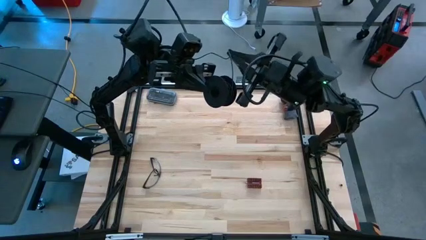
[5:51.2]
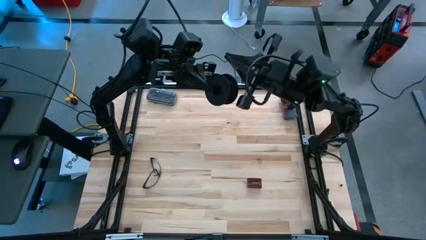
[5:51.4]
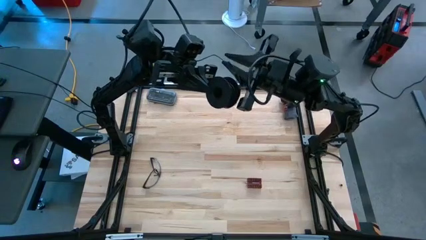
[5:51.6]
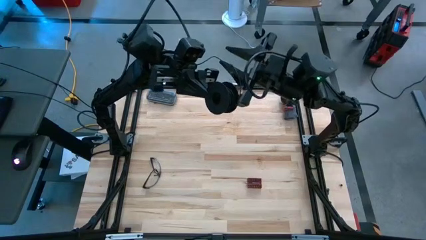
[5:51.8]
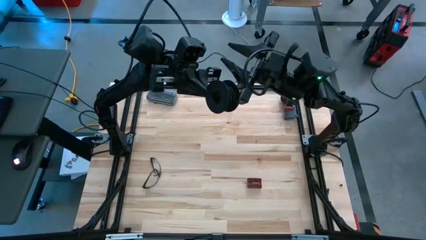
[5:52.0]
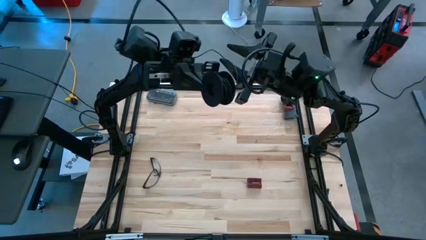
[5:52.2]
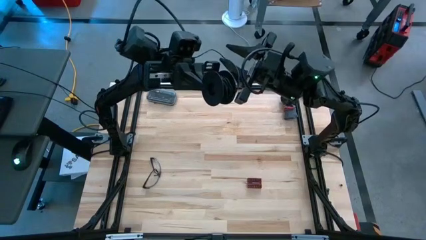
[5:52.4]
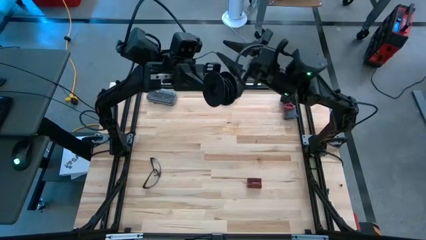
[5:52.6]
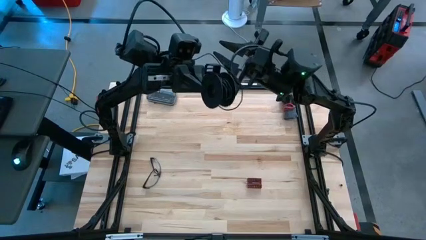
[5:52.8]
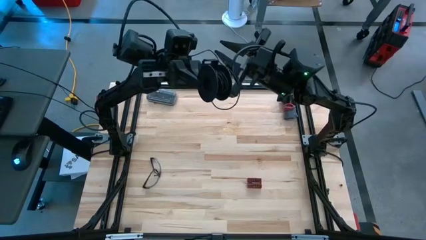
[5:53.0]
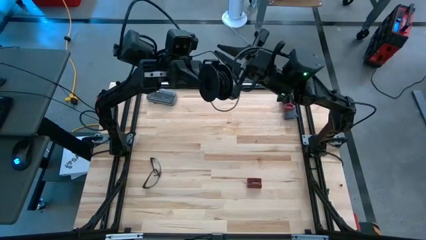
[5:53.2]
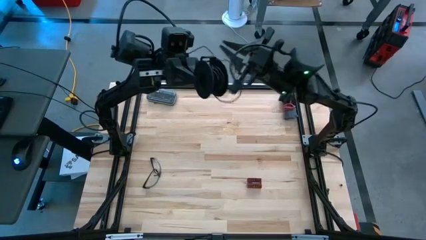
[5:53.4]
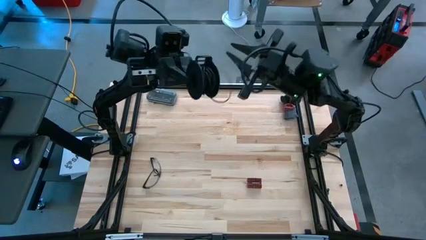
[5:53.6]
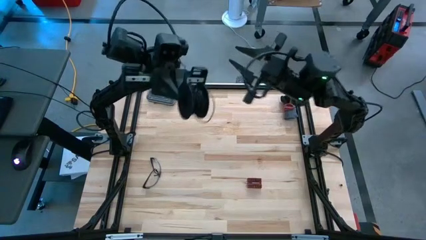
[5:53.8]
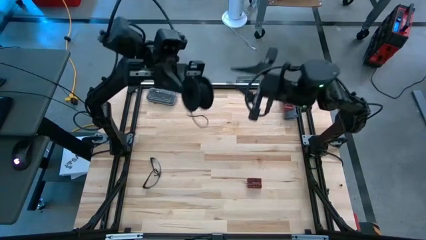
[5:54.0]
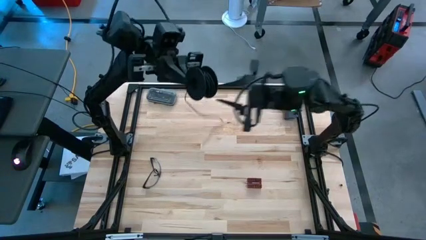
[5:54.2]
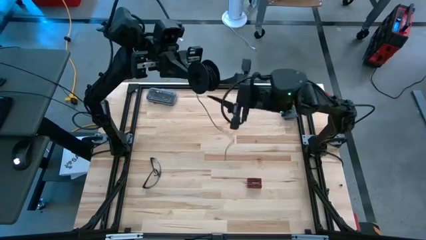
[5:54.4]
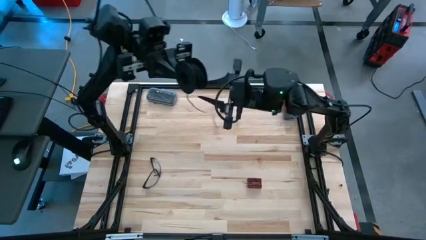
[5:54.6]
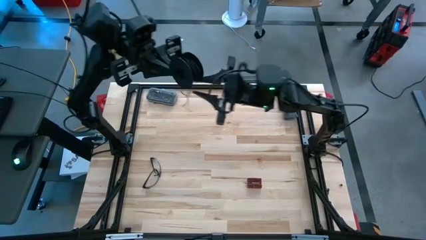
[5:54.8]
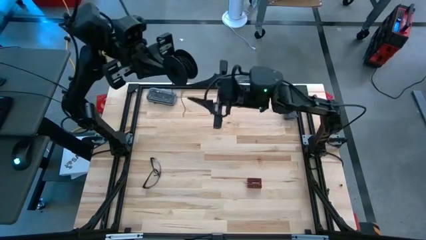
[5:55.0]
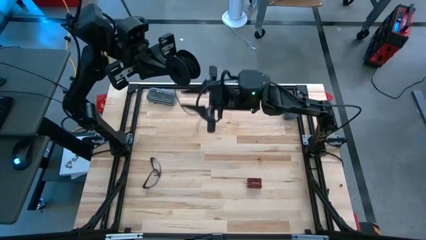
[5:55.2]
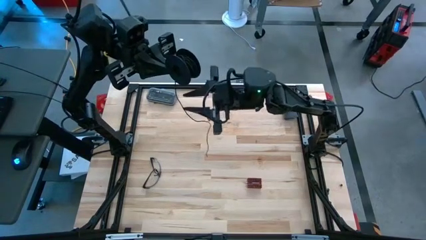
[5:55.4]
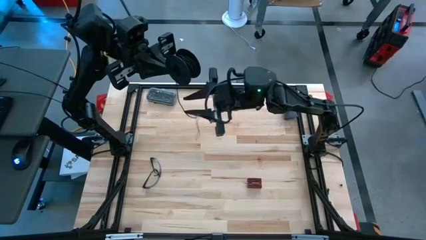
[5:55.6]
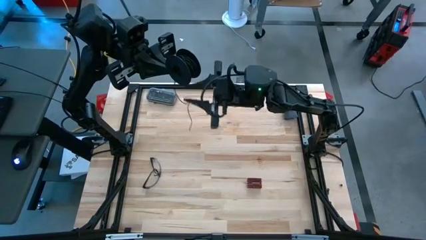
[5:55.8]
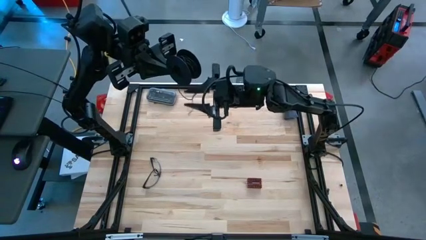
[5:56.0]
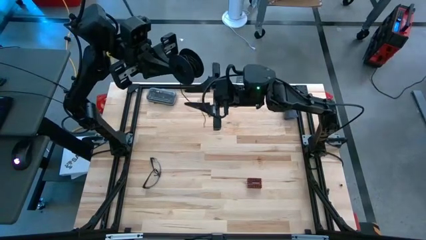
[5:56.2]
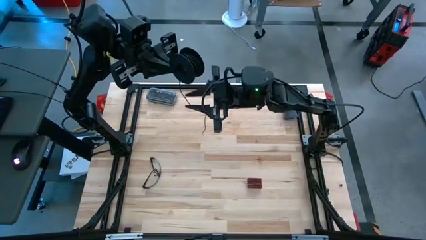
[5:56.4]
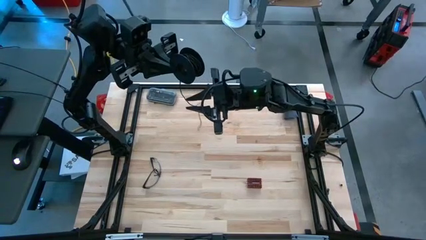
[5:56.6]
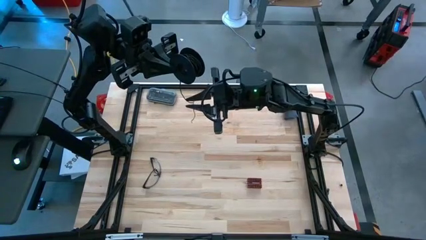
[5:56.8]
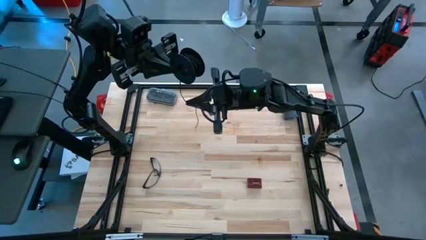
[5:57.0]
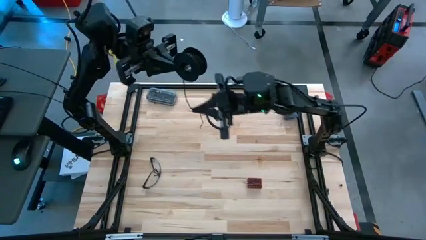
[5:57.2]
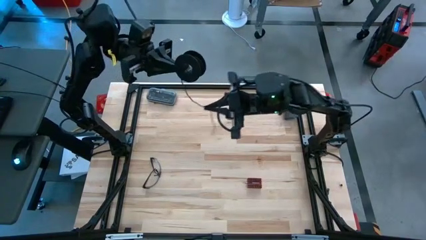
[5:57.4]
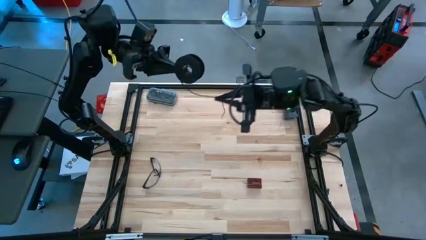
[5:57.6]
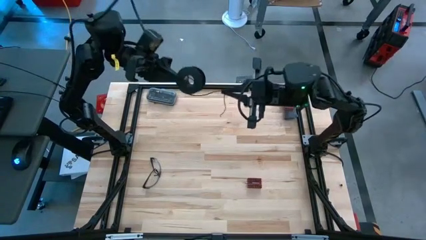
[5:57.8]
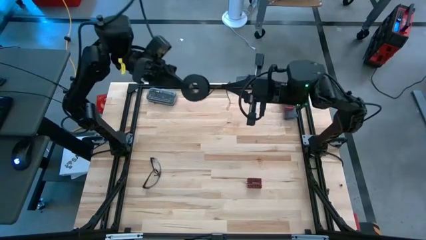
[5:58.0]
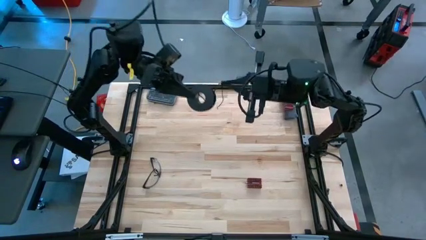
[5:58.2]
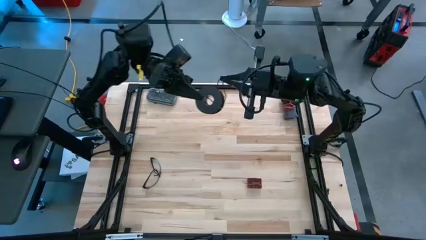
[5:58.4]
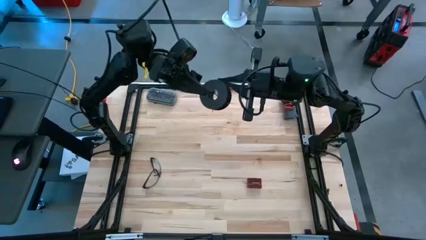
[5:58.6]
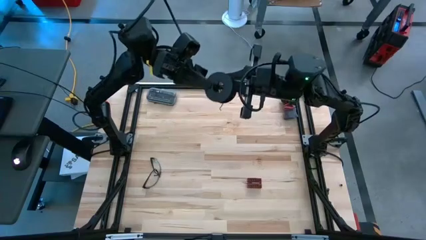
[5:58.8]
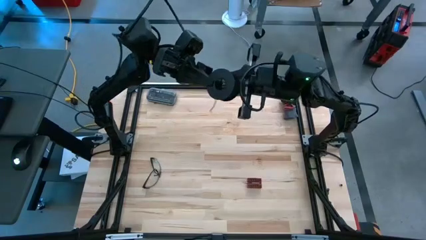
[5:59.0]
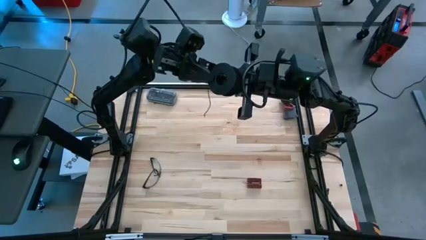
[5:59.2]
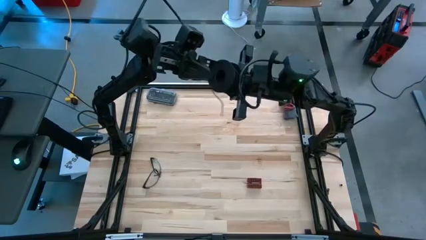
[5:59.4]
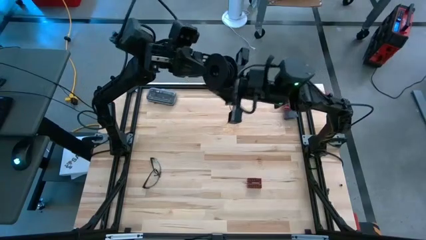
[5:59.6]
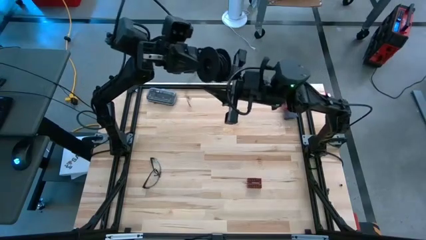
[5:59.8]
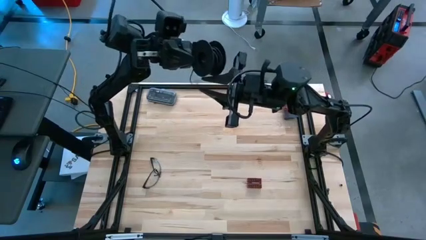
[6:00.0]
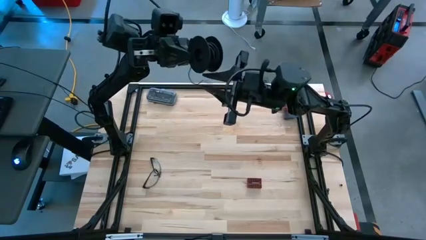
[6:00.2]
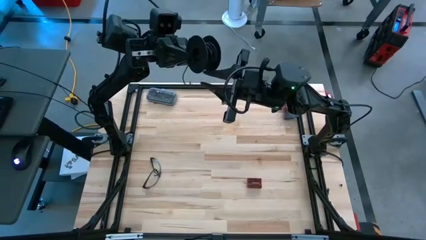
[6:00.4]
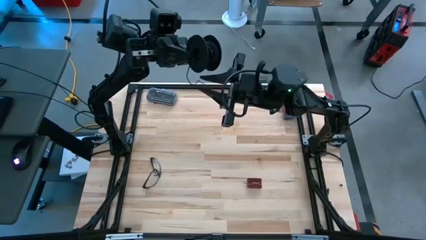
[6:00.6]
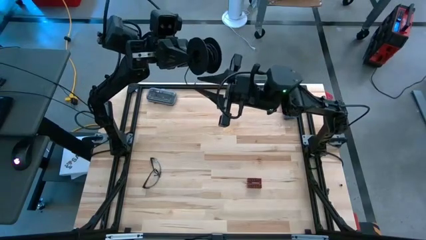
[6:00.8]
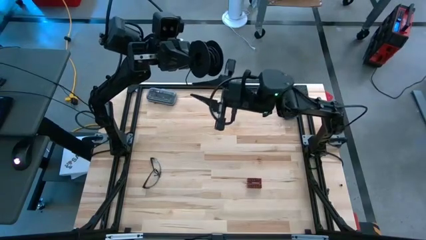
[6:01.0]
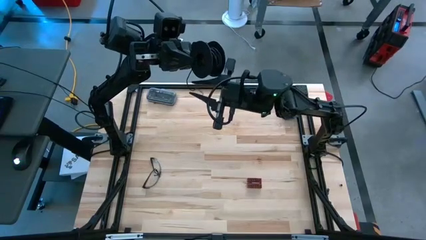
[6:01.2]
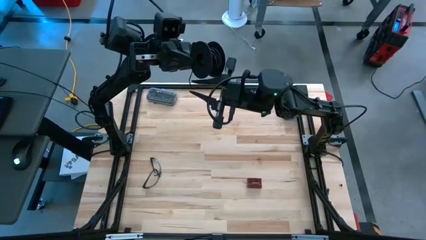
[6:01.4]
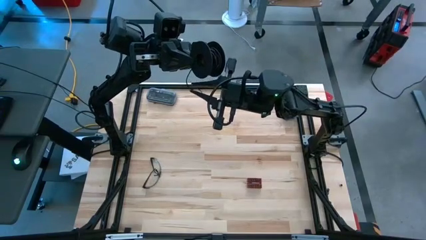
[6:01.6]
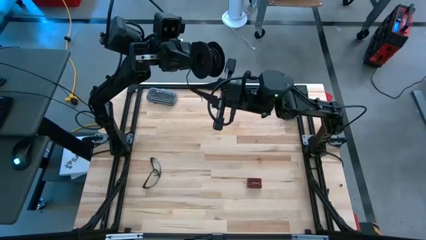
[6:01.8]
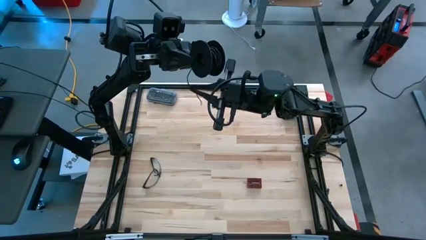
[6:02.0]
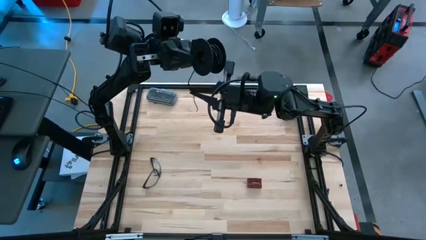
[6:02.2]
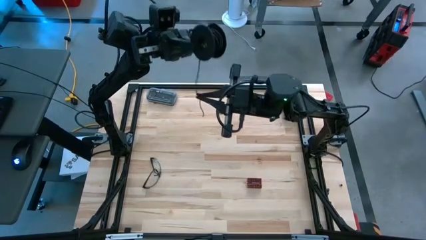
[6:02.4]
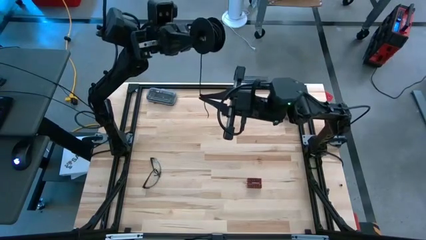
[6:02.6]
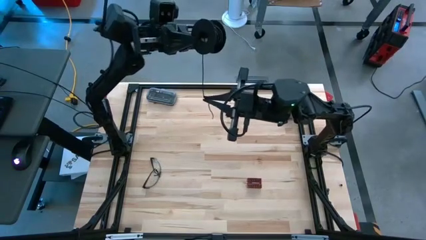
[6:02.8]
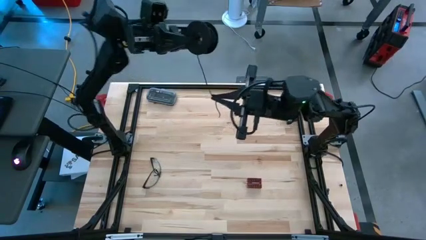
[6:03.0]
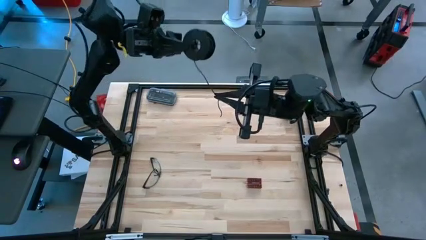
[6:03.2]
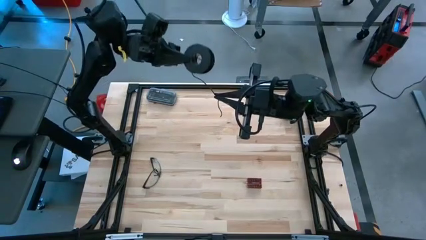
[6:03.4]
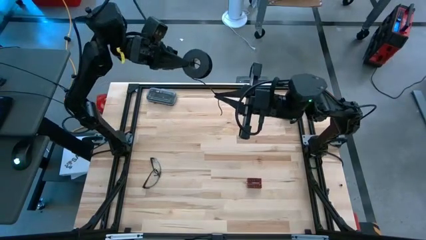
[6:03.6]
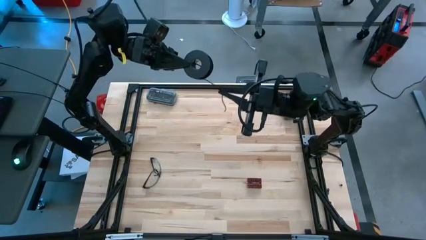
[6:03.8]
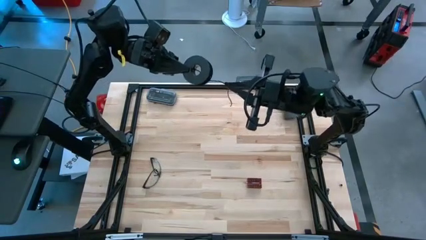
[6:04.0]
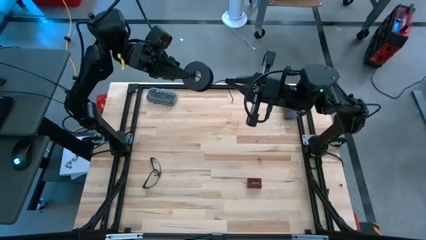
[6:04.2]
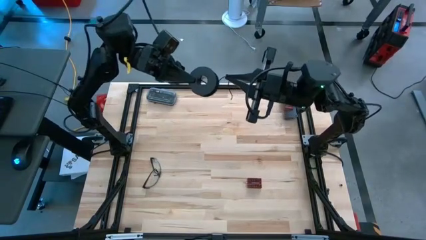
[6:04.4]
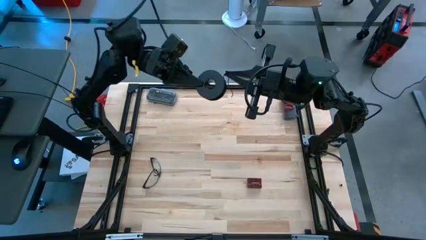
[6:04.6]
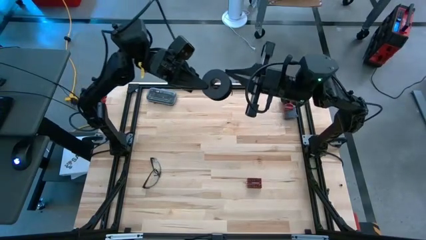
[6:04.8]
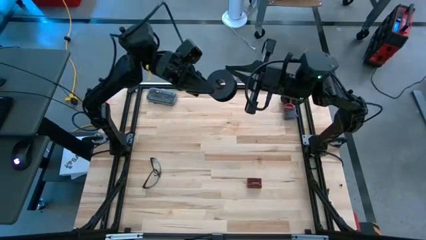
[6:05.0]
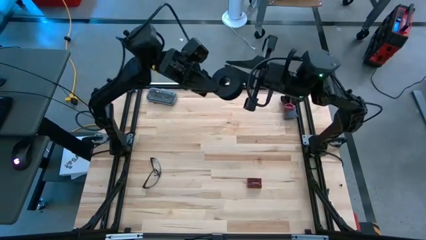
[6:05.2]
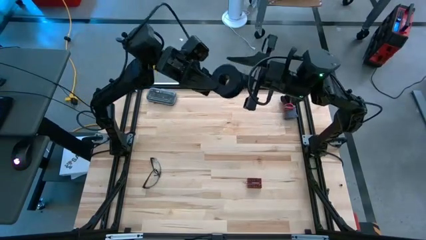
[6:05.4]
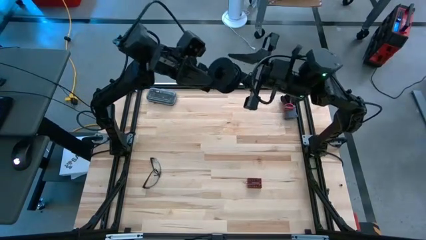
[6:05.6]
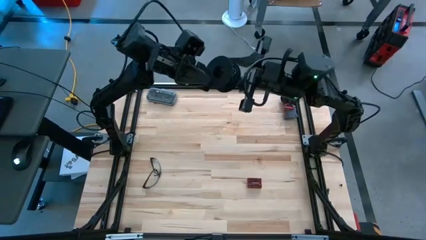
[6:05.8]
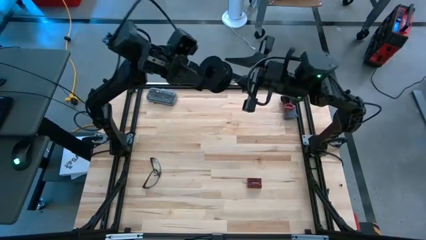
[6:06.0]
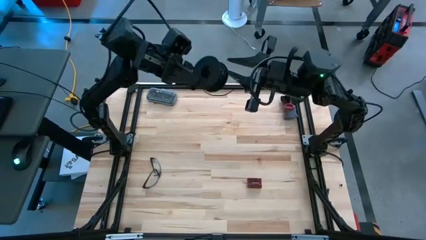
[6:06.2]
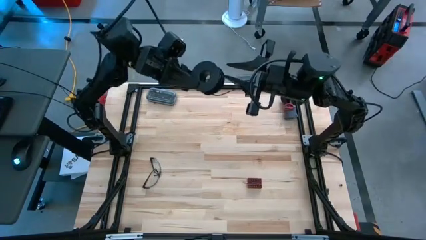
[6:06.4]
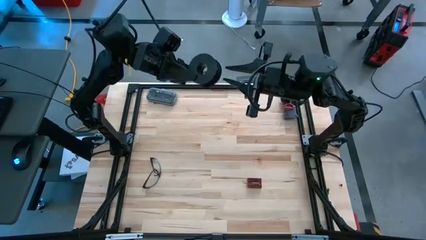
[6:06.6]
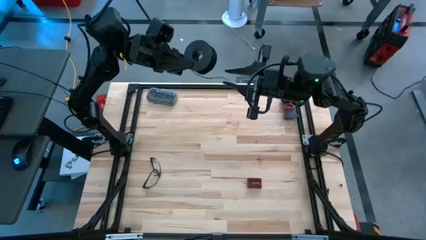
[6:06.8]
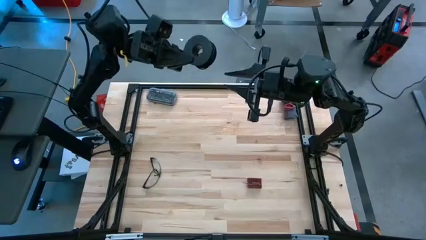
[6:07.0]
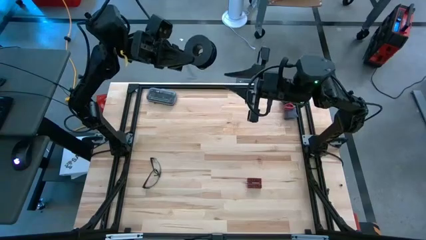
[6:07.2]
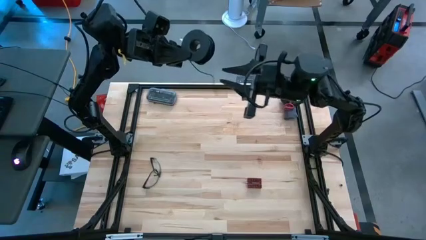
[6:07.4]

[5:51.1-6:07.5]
Task: Coil cords
Coil the black wire into the spool
